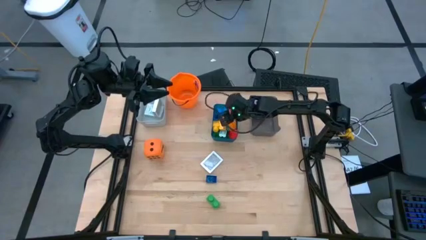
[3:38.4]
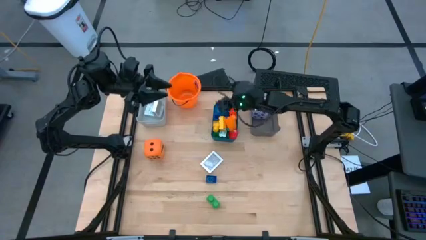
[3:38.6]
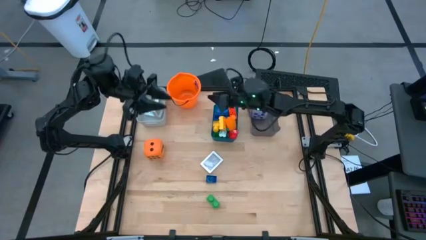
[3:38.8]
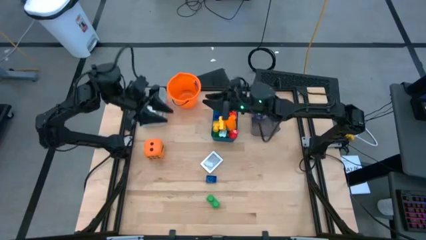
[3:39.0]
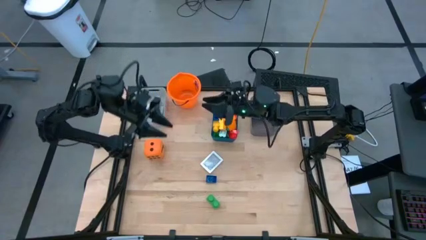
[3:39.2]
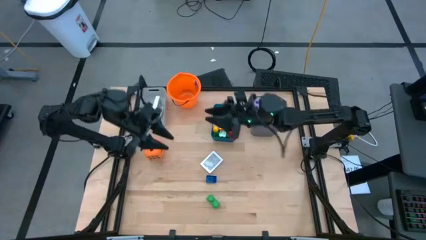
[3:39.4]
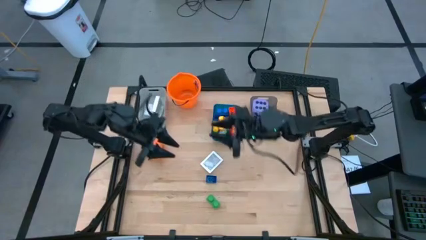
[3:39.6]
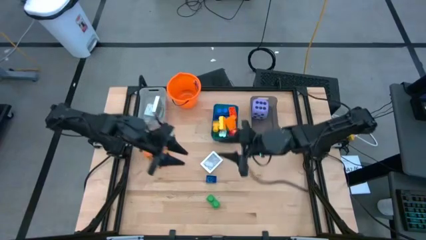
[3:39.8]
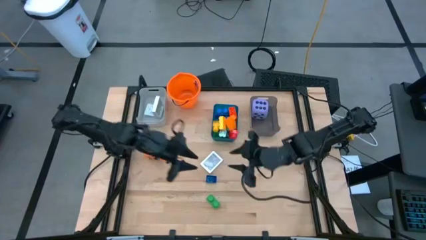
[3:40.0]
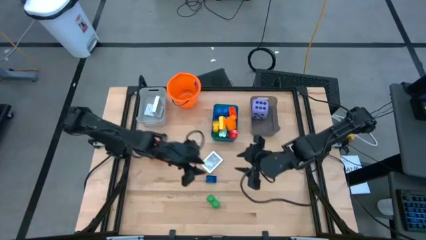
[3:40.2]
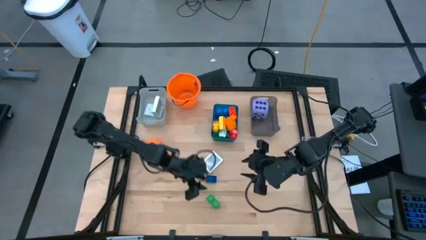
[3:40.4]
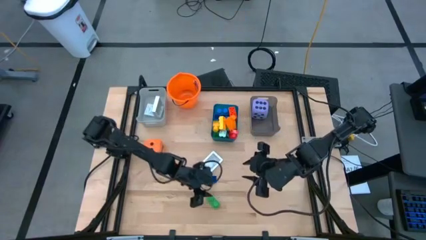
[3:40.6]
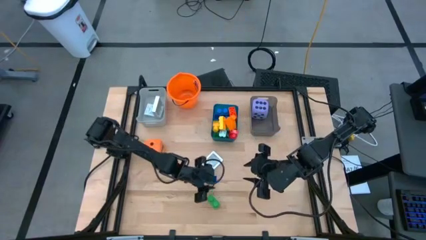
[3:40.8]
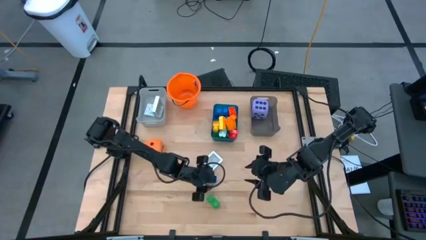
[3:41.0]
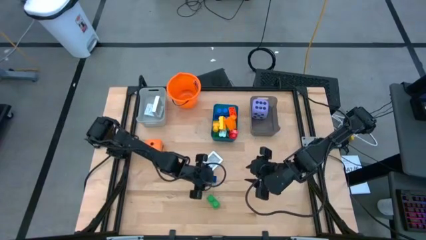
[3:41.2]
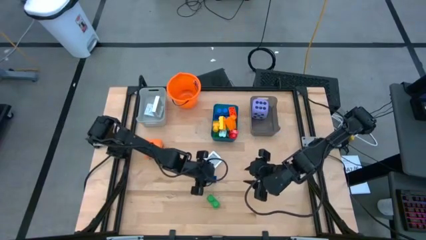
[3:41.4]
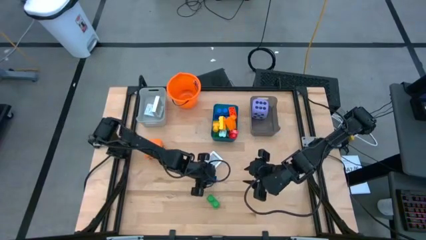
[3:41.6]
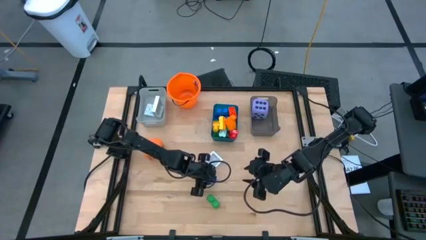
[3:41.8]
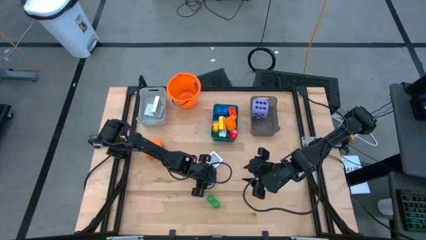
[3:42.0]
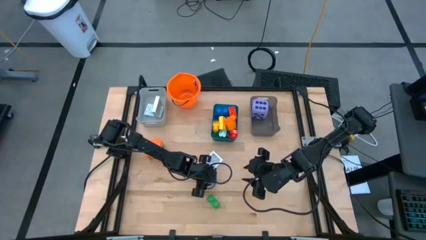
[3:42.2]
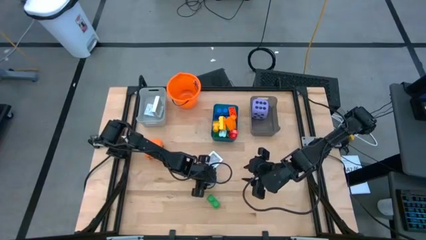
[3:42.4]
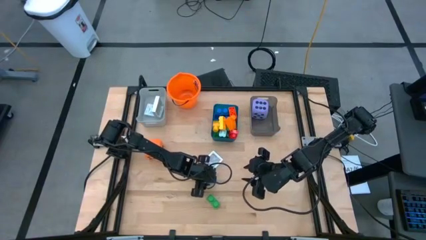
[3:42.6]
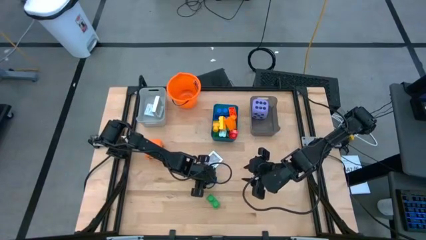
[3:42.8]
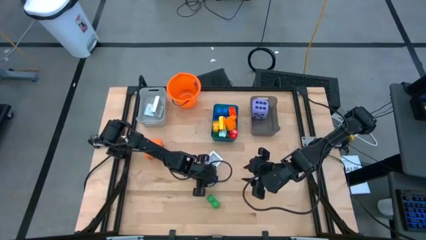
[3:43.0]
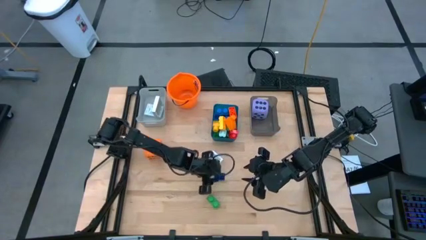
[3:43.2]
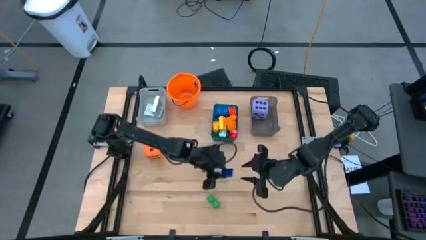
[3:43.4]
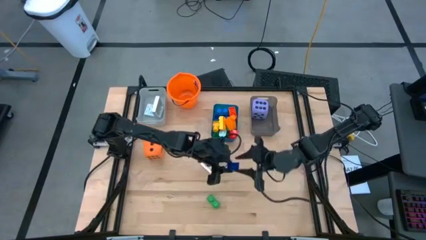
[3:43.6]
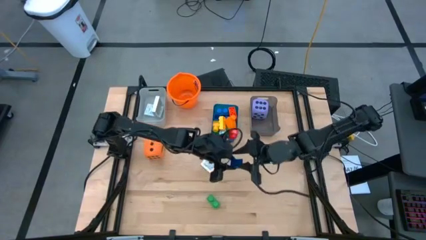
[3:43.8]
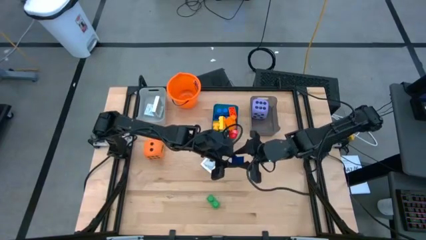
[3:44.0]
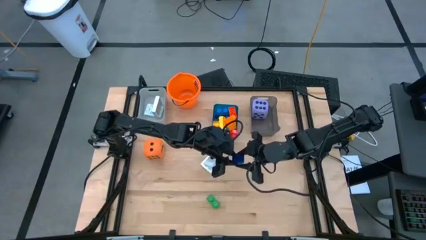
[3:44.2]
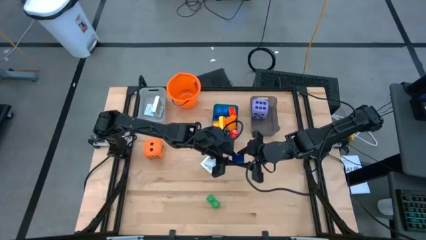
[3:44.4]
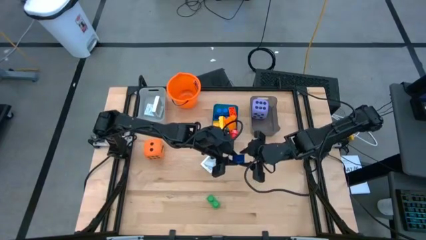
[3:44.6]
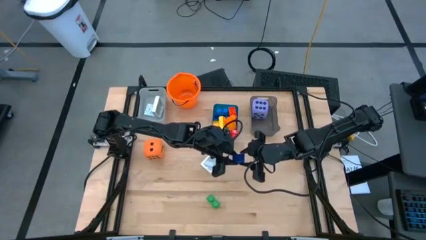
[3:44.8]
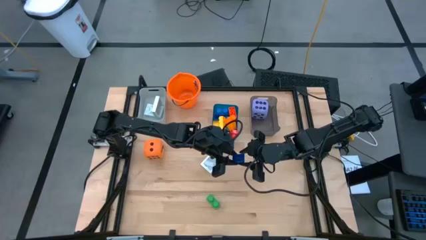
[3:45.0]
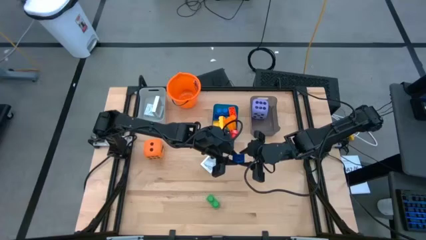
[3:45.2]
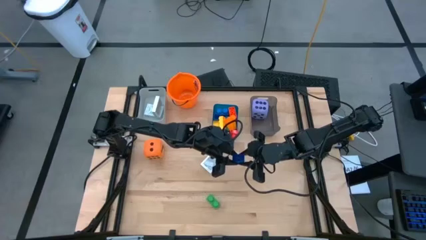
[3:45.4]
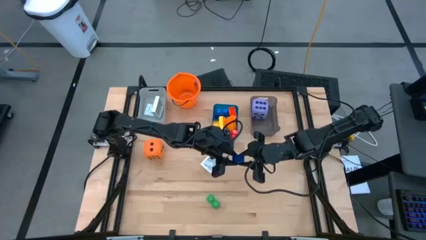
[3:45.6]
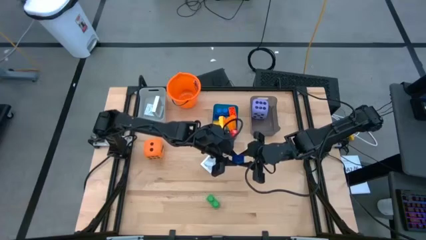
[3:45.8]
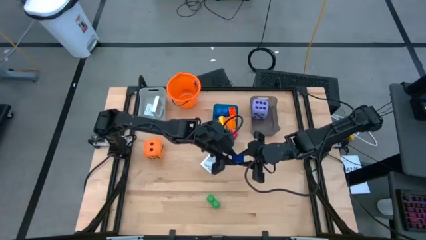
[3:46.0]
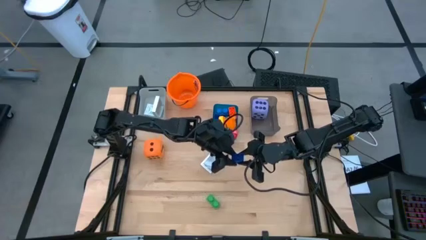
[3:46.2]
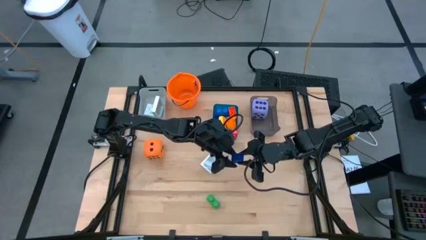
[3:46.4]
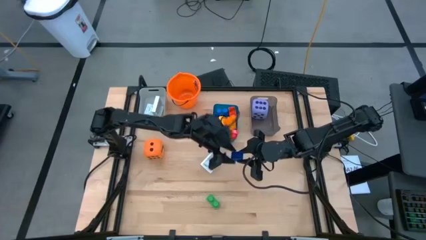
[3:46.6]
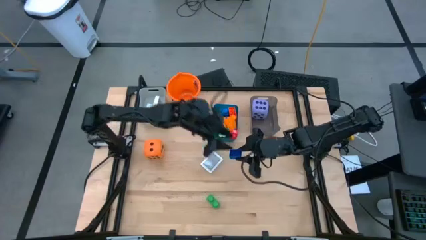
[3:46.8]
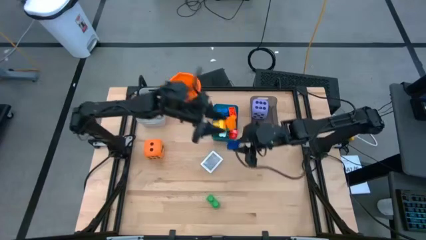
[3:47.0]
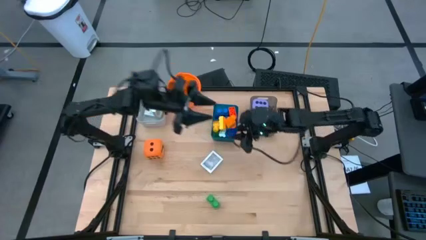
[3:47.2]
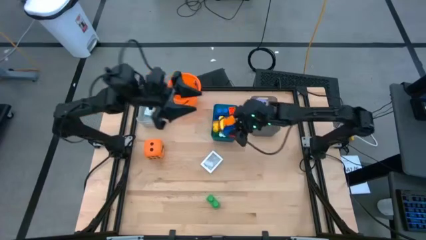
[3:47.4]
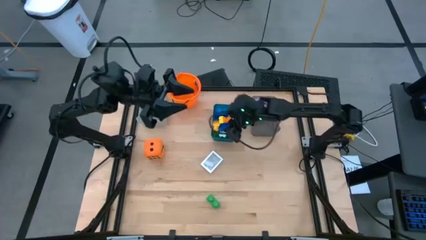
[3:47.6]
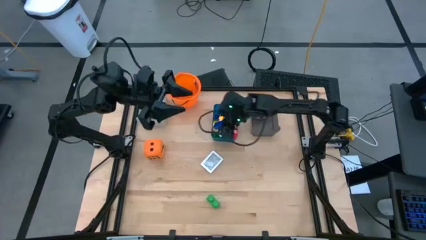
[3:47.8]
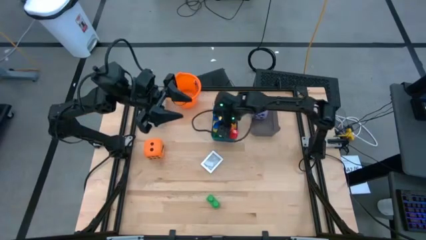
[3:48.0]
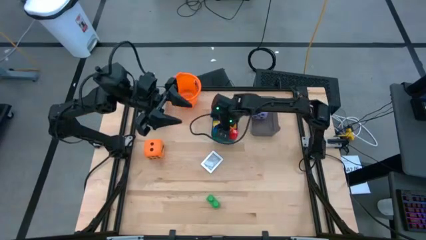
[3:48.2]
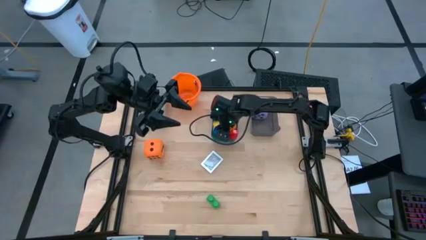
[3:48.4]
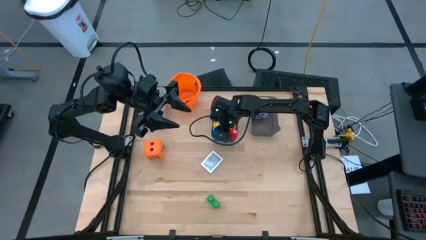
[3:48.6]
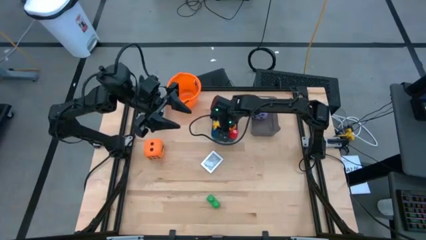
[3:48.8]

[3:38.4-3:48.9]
Task: Pick & Place Toys
Put the blue game piece into the blue bin

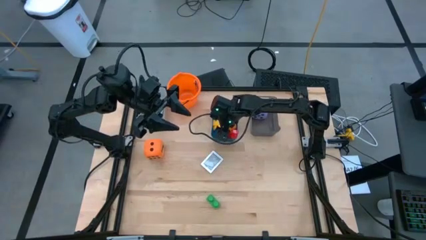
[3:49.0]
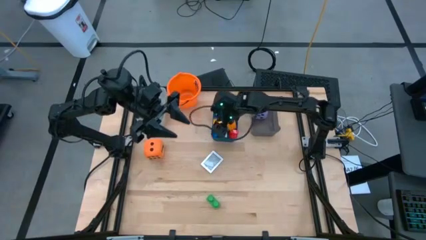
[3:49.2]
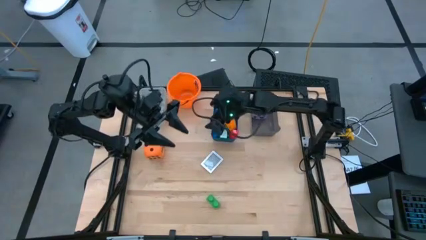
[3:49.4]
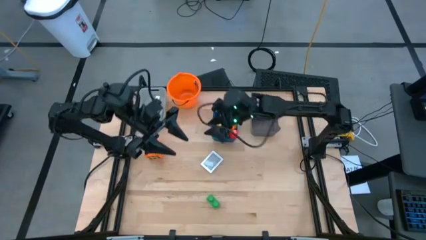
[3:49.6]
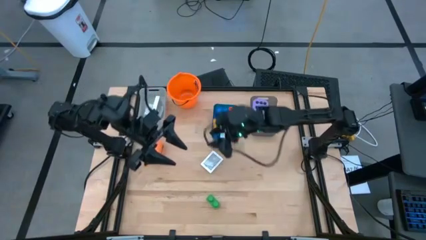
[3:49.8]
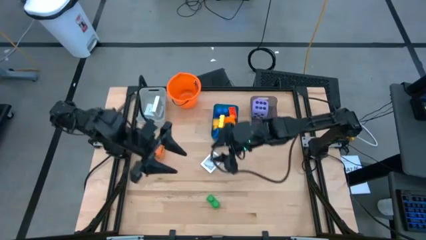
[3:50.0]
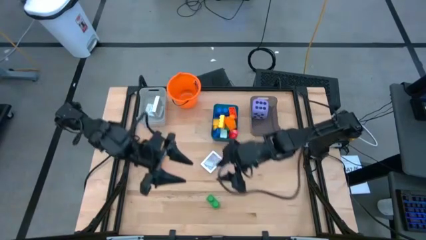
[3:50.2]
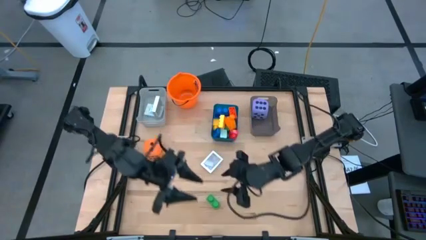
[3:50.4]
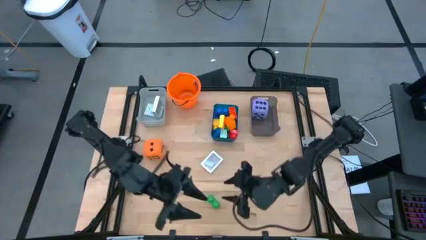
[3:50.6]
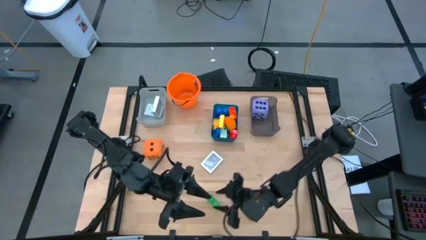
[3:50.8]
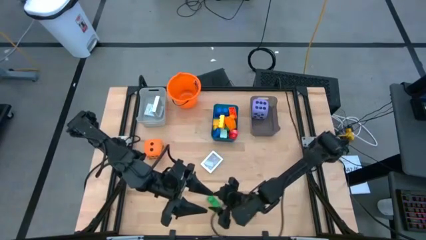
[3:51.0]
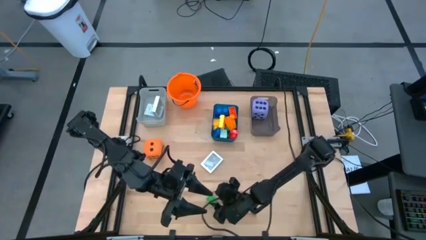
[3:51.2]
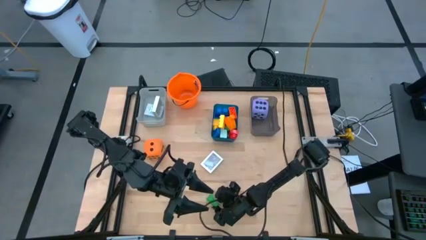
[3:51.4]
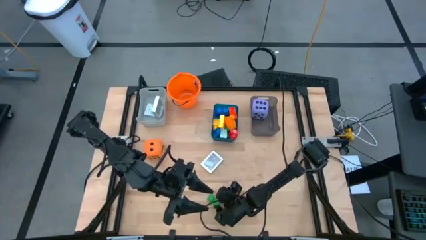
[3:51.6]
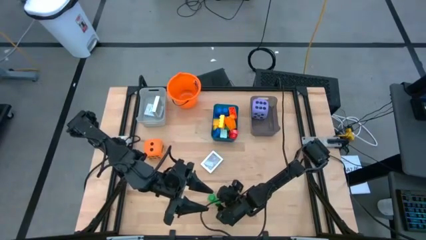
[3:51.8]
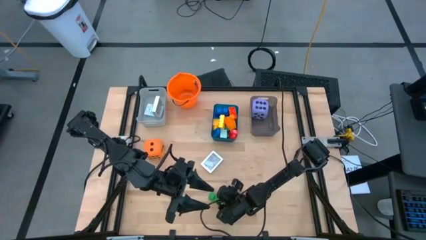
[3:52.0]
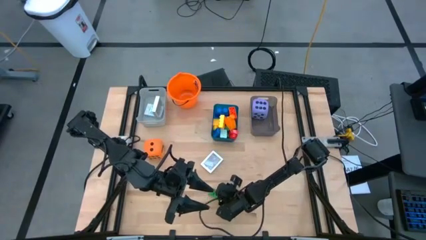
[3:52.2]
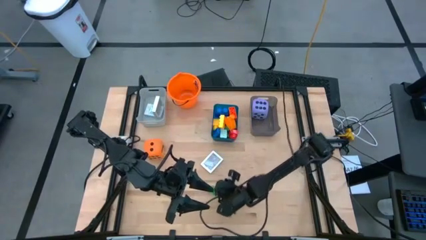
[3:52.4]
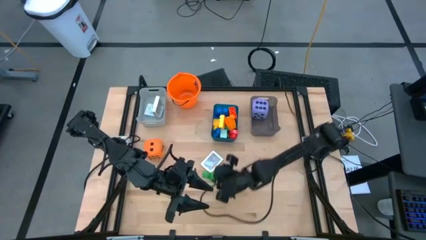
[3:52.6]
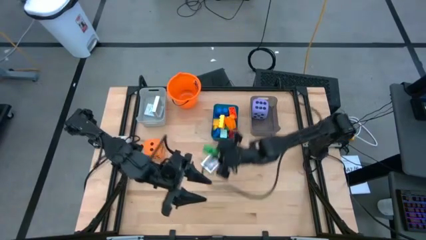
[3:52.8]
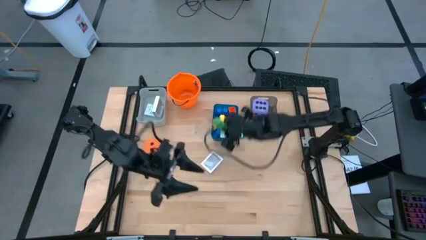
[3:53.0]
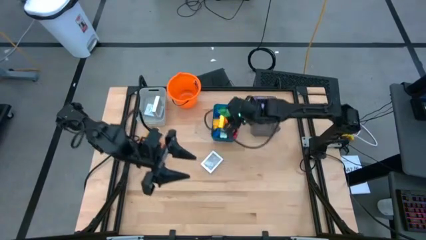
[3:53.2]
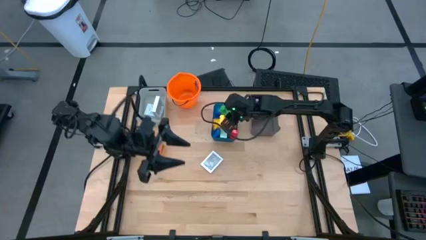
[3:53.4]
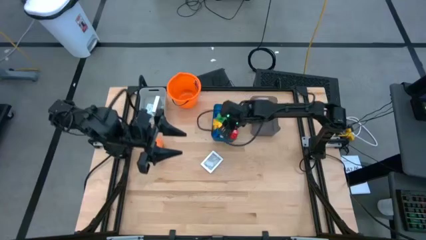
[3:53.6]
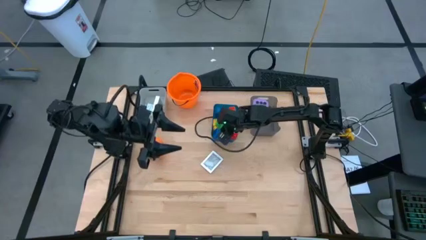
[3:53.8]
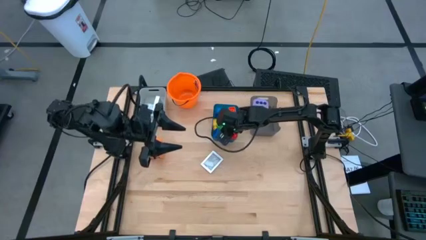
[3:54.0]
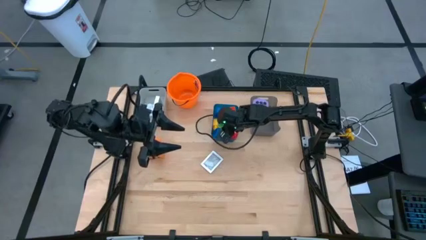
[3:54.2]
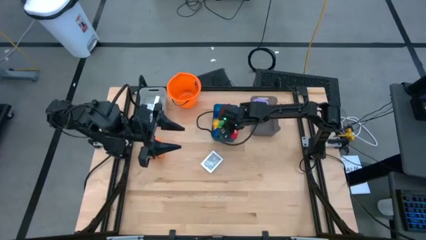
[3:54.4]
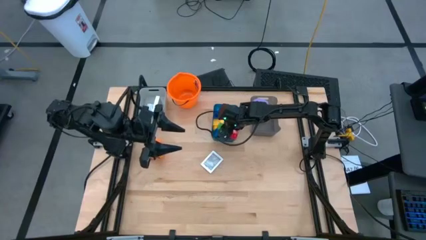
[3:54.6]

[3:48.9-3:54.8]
Put the green game piece into the blue bin

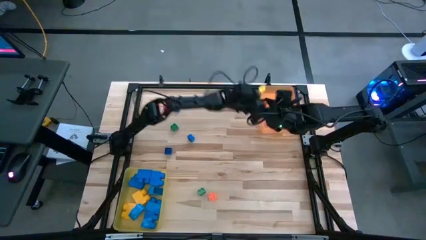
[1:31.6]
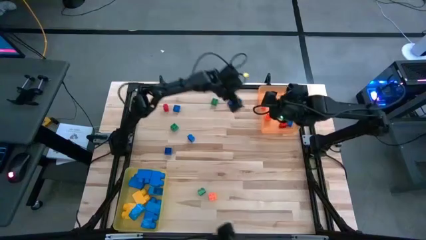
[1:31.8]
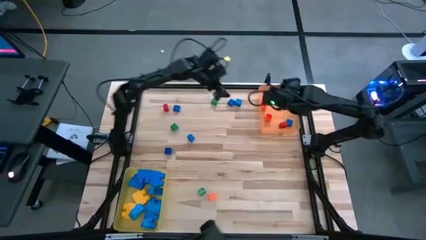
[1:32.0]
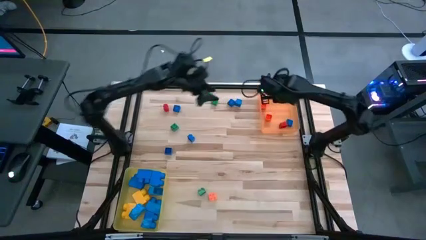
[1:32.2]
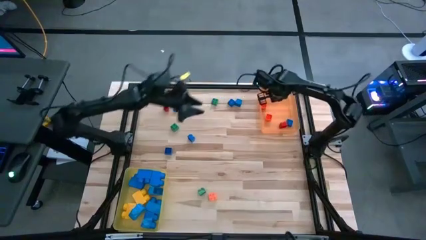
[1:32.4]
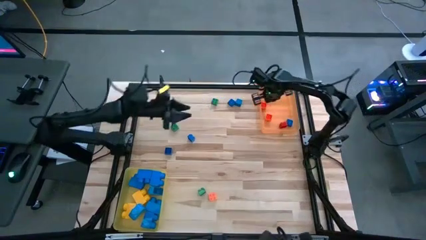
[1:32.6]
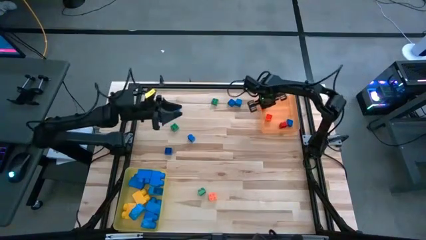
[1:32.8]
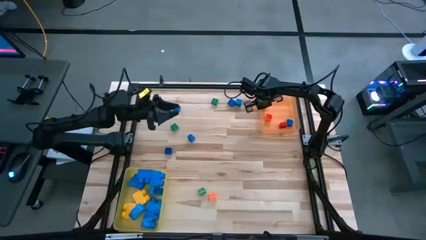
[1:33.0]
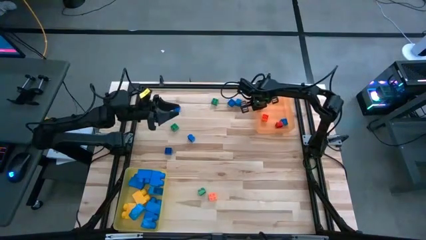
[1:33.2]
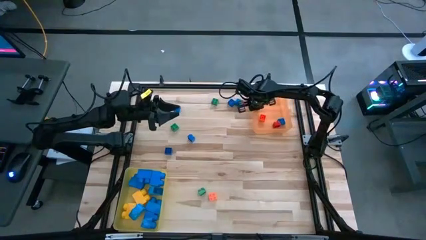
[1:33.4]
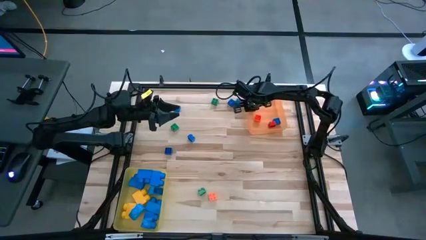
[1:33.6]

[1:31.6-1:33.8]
Task: Sort blocks by size
Adjust the orange bin
